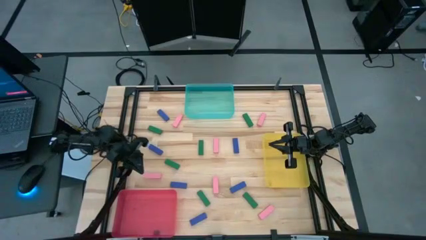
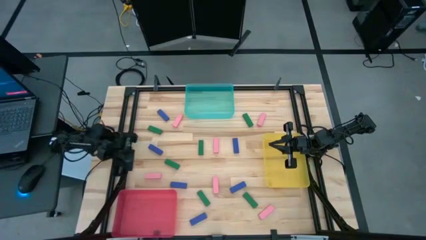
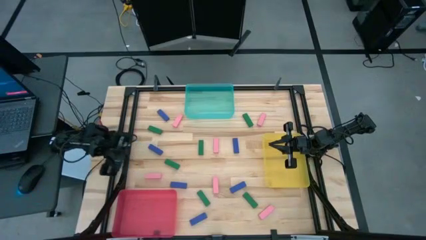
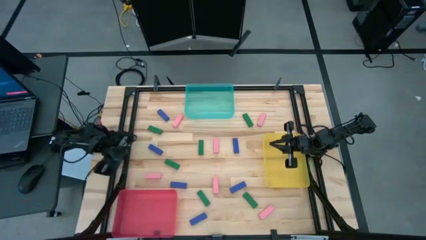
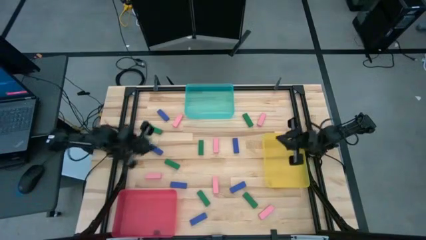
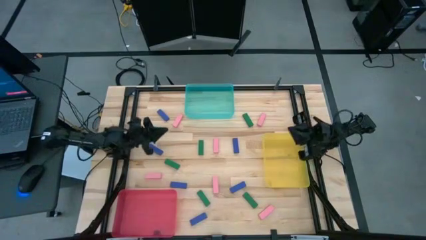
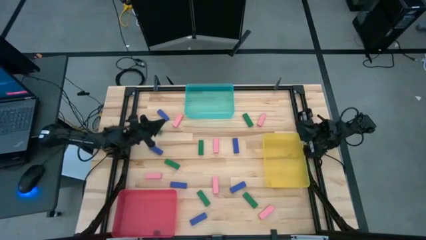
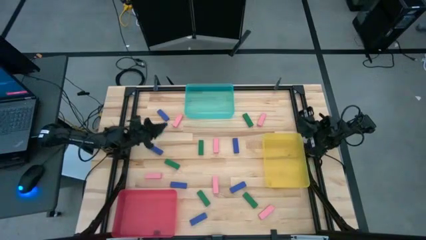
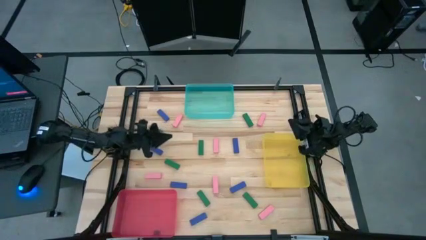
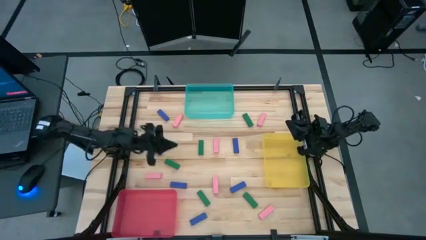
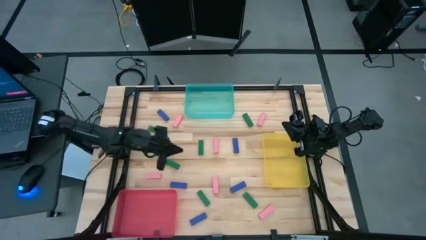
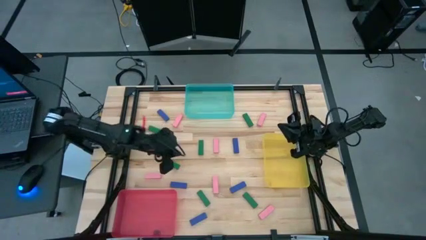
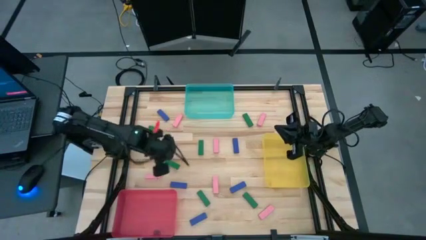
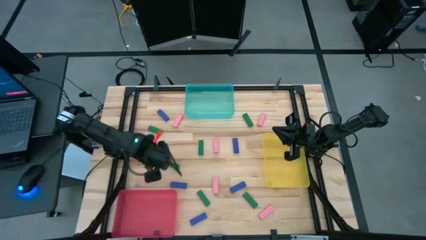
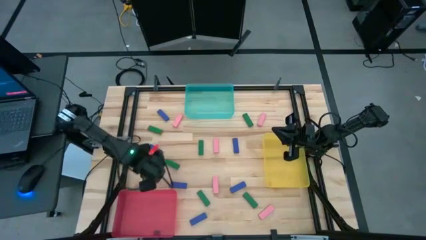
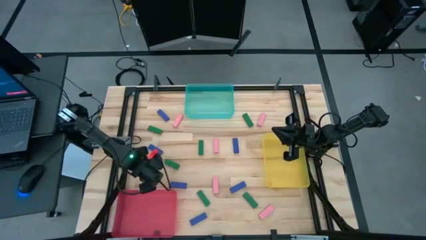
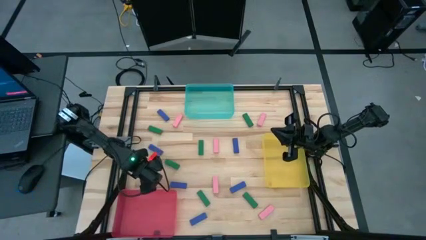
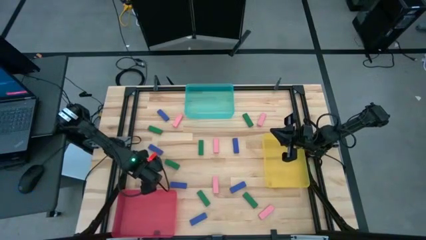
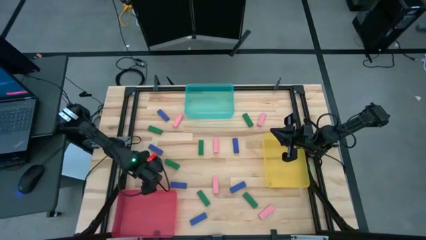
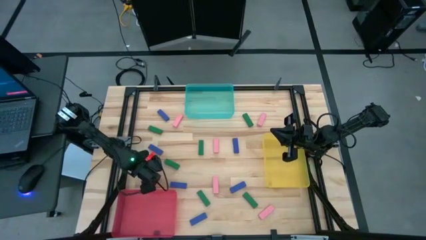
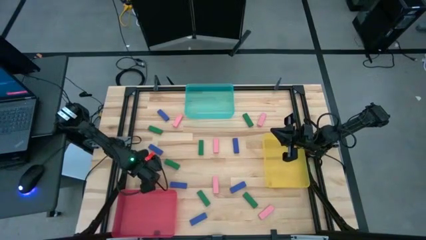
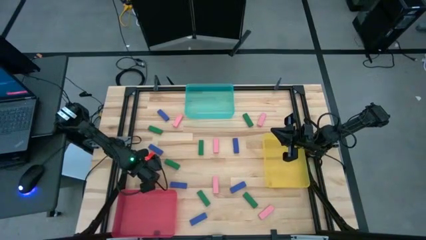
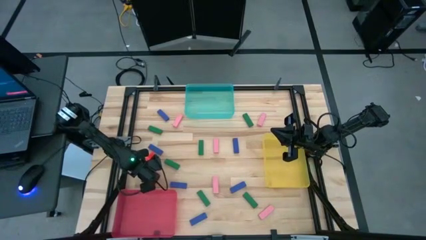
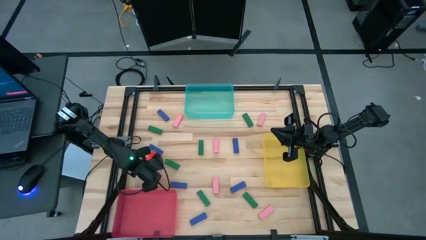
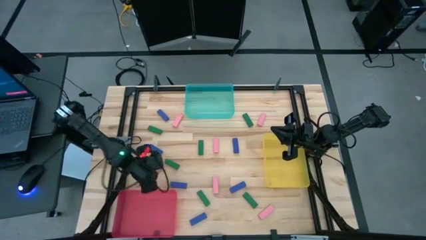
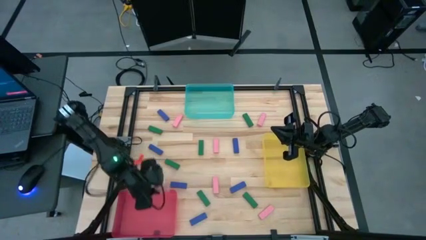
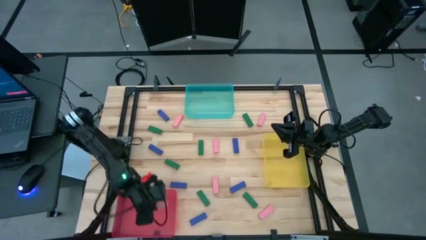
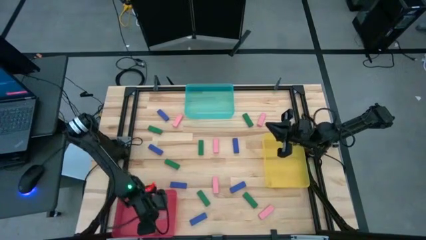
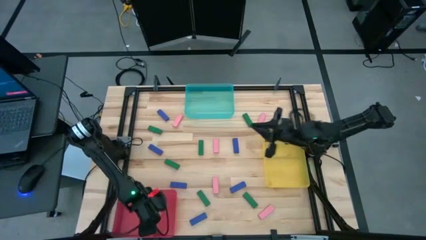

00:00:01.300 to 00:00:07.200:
Task: Sort blocks
Put the pink block into the red bin

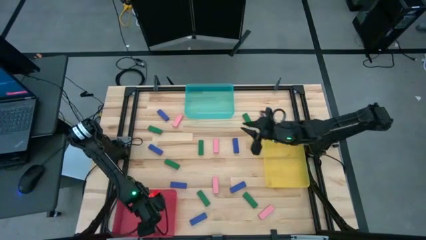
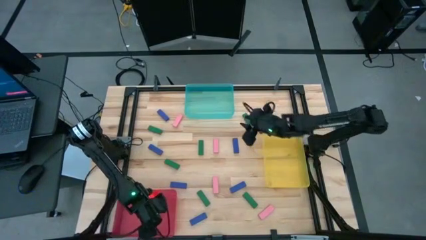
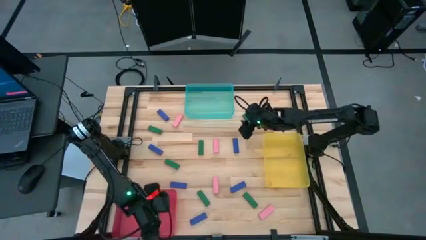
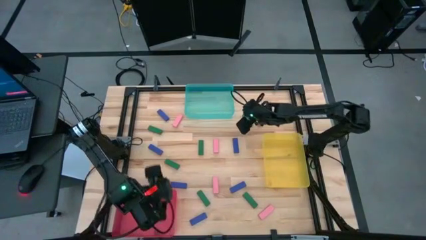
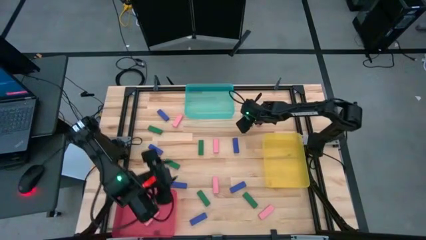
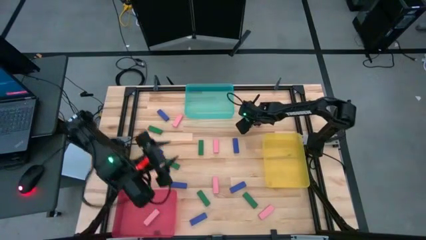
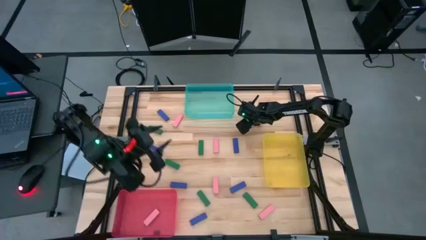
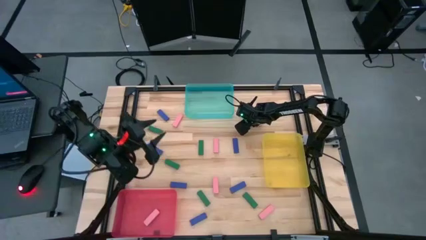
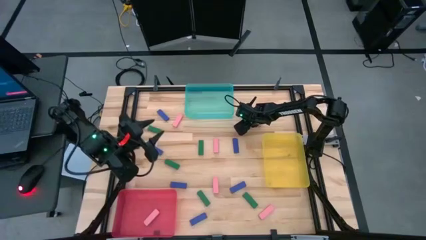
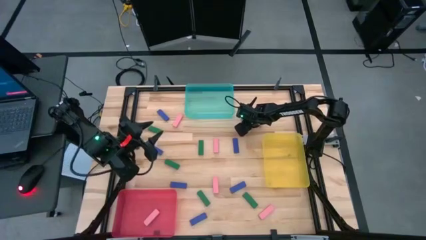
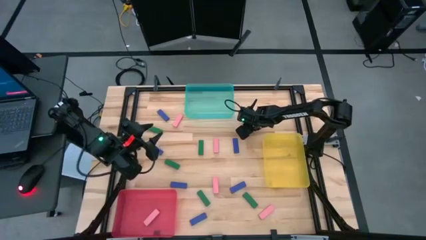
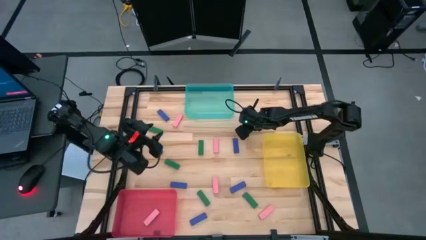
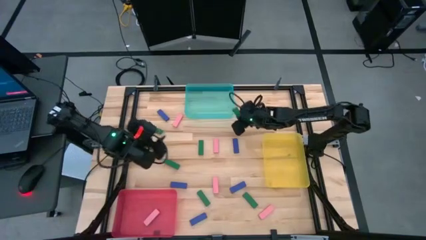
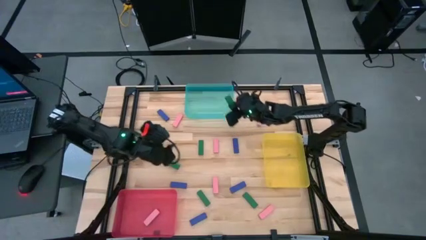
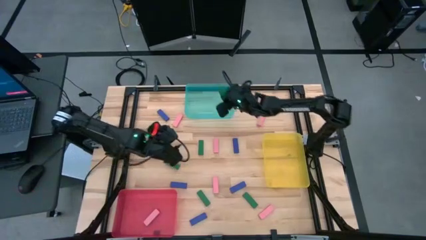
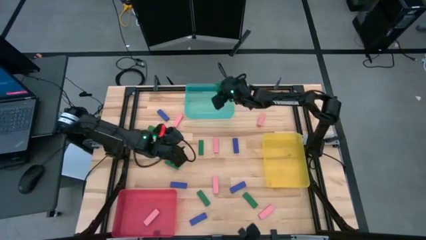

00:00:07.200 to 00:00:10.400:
Put the green block into the blue bin

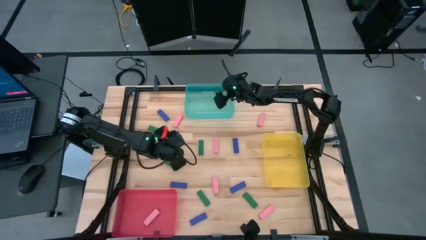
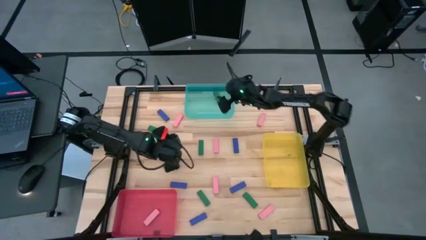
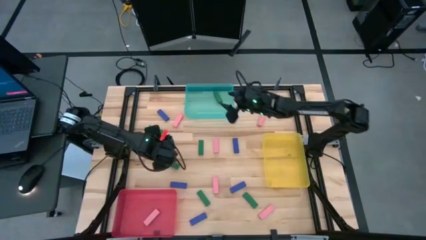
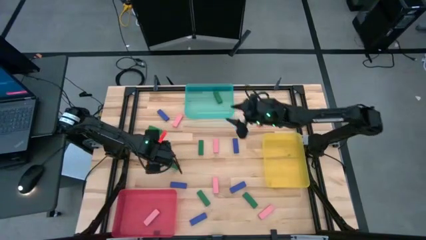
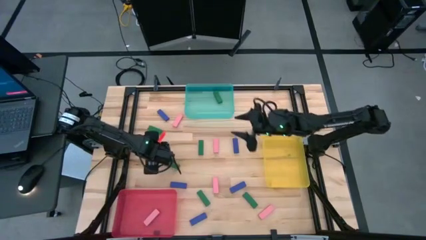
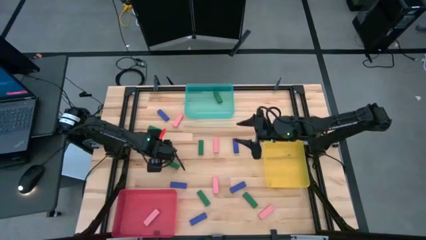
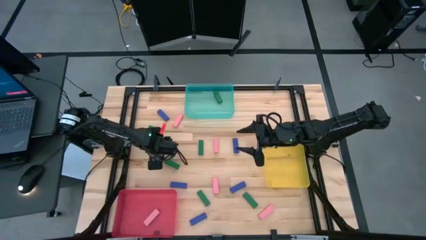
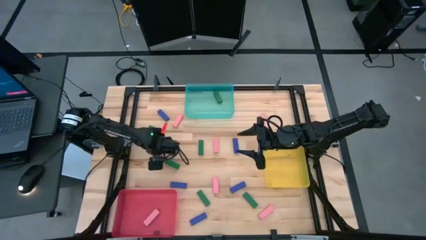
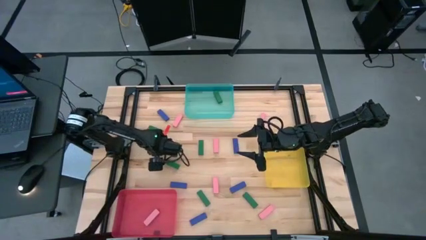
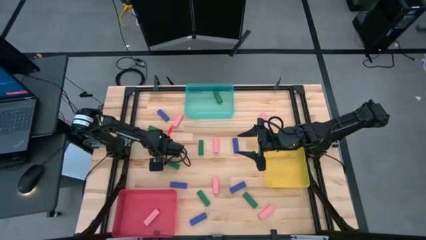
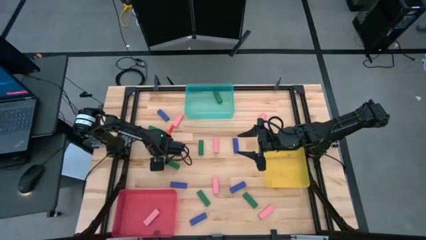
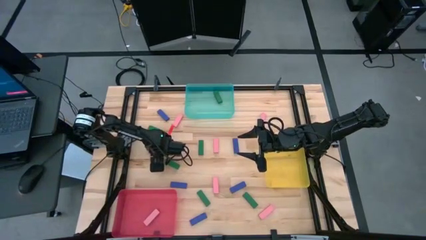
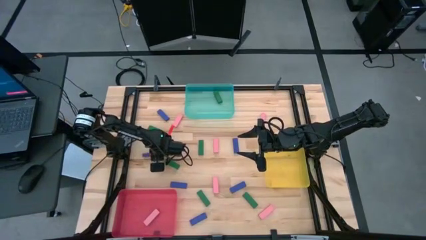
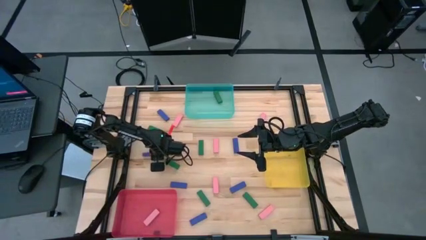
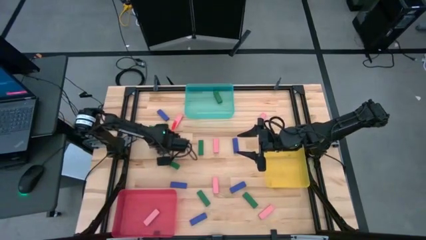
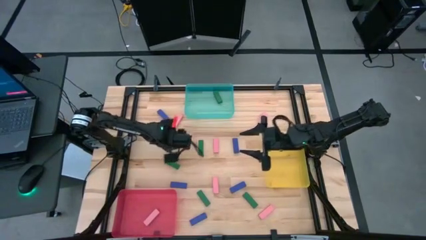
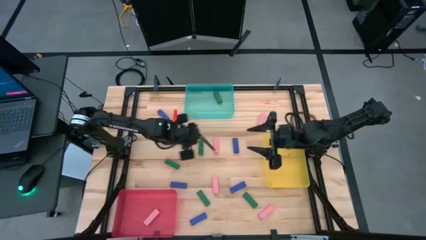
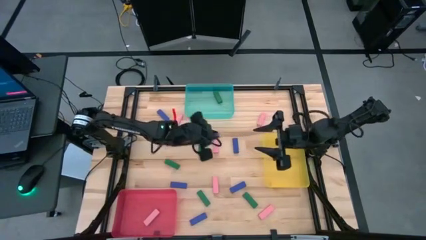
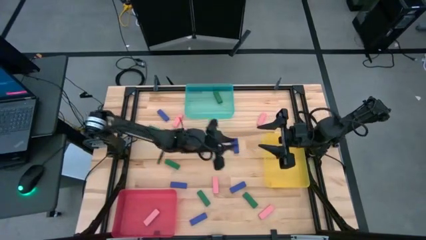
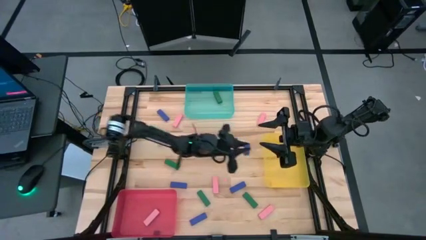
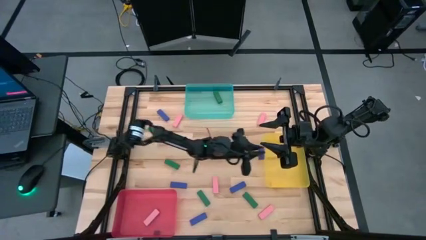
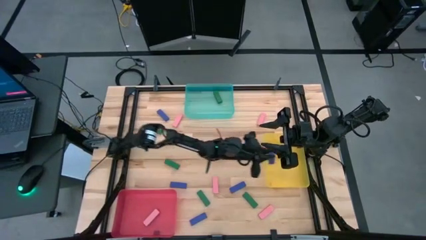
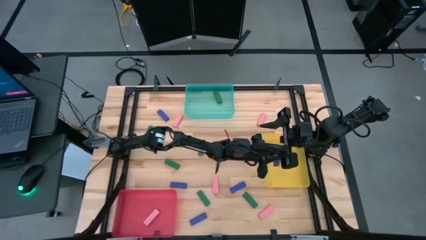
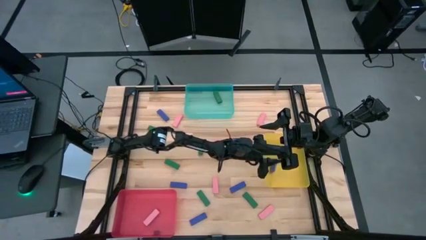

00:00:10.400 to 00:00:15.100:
Put the blue block into the yellow bin

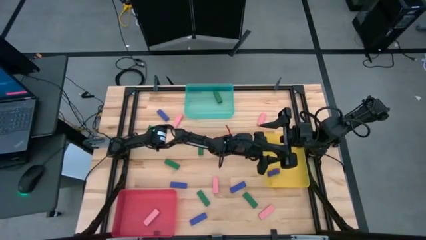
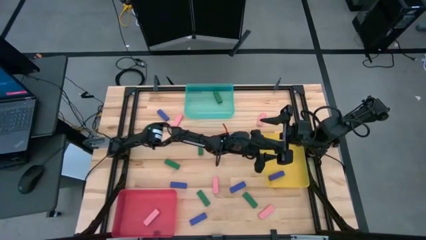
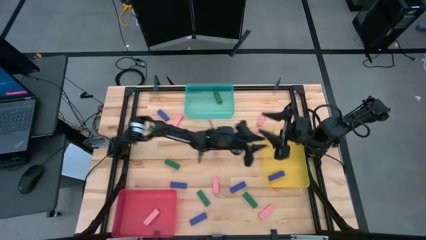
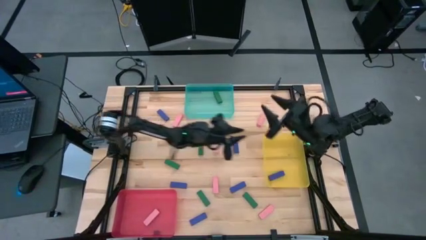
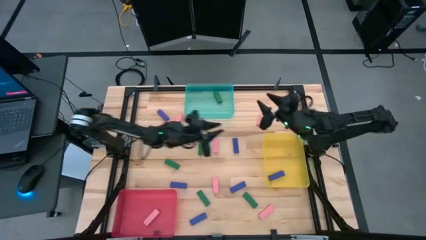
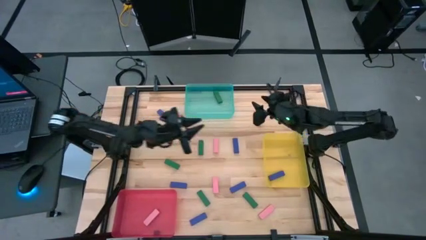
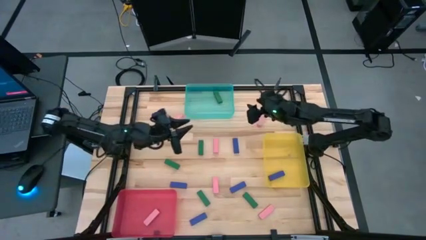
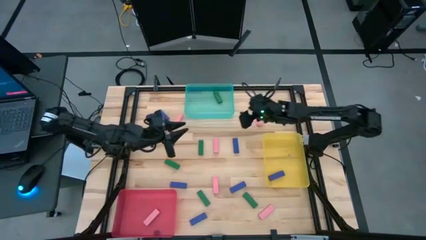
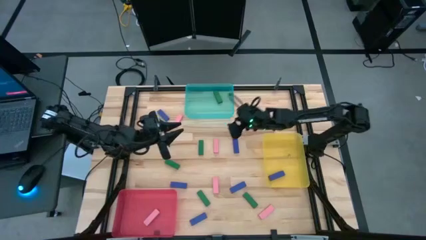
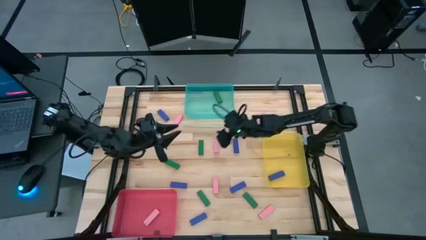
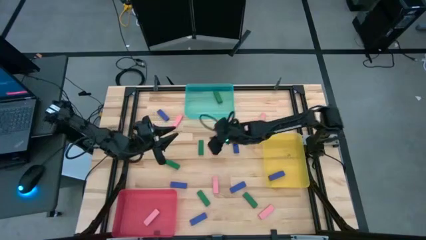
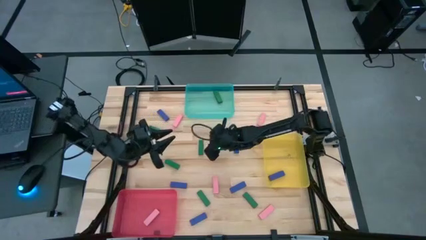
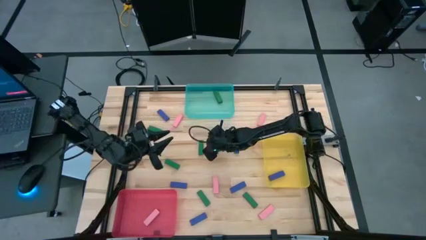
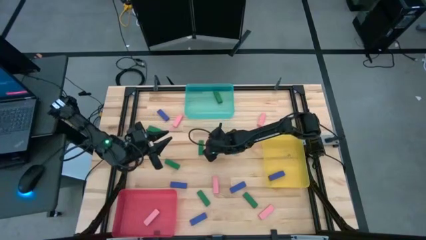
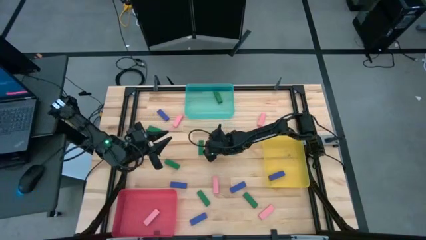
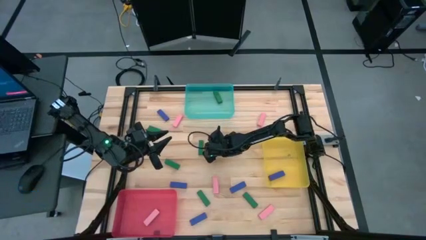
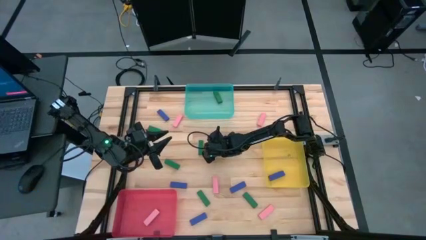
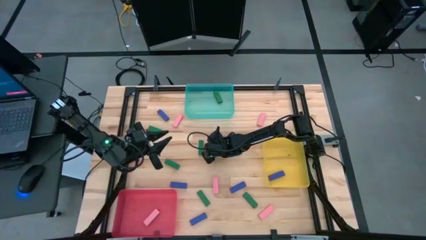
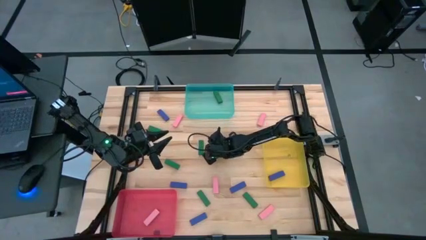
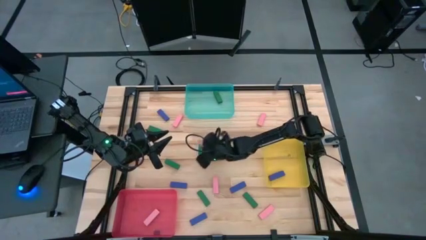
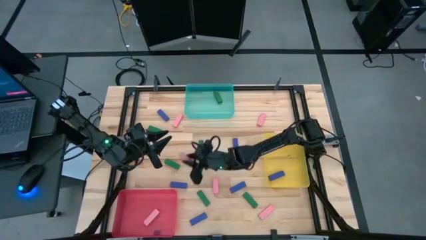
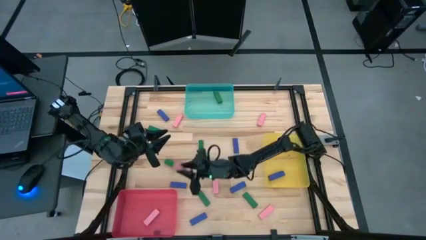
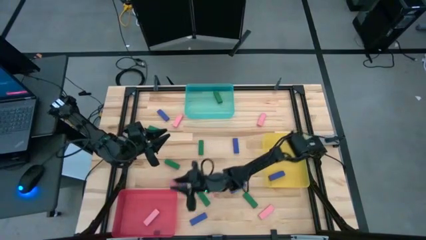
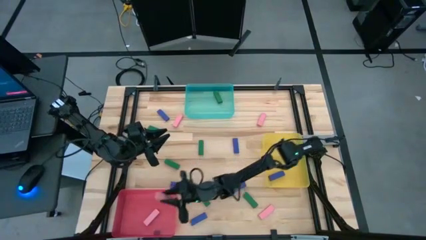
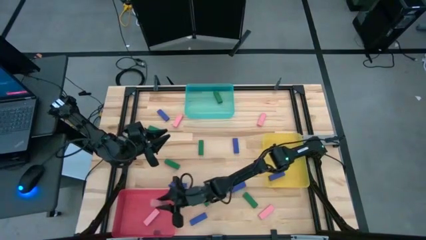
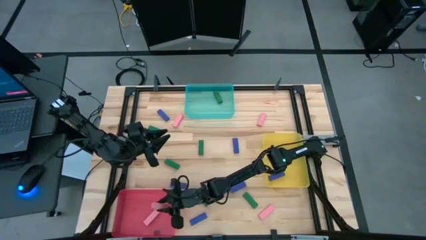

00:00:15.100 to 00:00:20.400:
Put the pink block into the red bin
